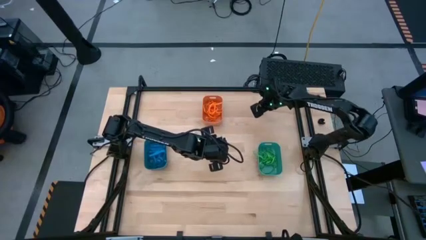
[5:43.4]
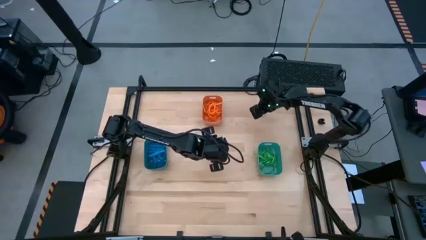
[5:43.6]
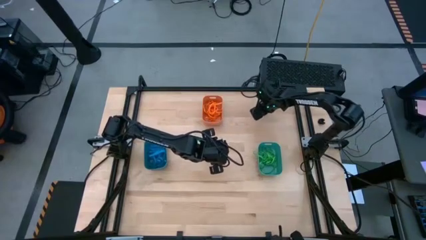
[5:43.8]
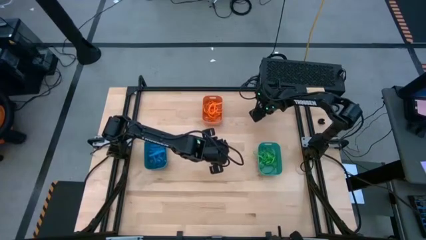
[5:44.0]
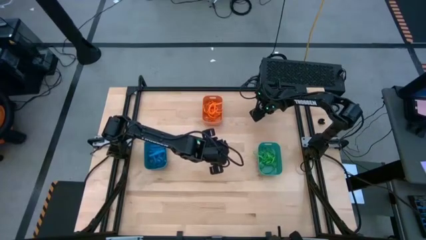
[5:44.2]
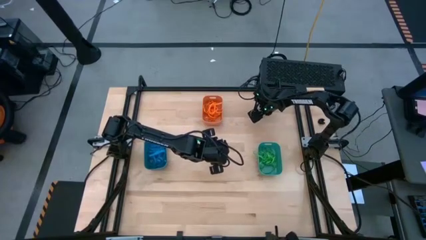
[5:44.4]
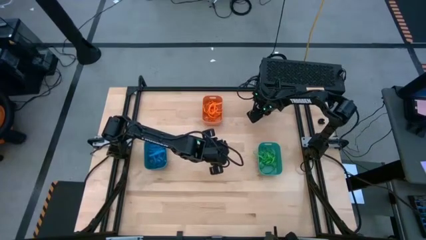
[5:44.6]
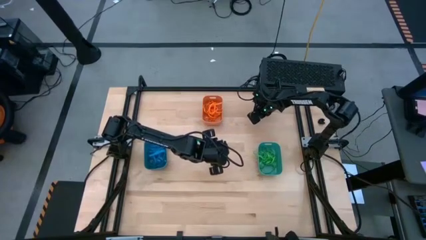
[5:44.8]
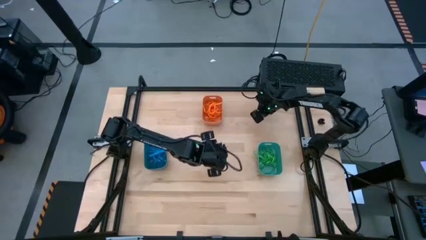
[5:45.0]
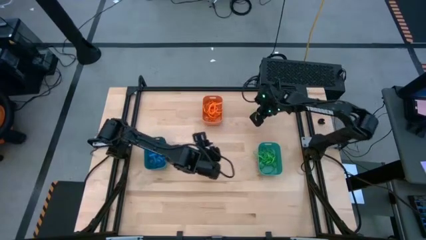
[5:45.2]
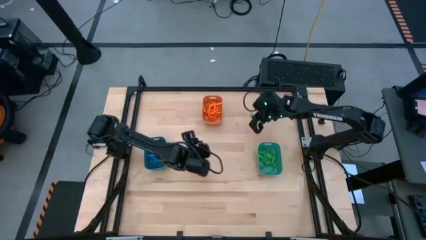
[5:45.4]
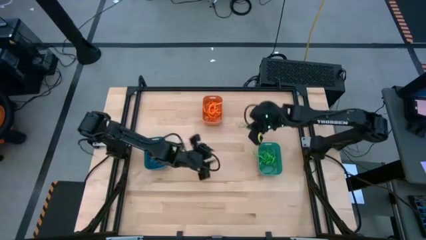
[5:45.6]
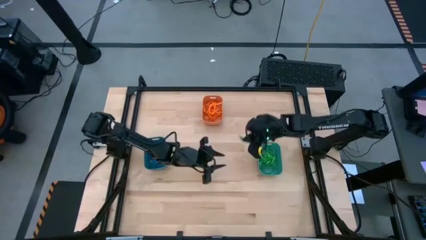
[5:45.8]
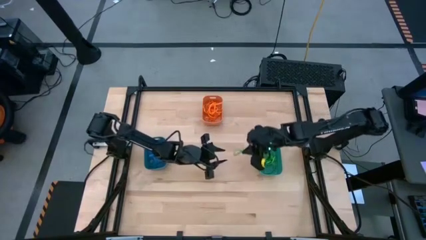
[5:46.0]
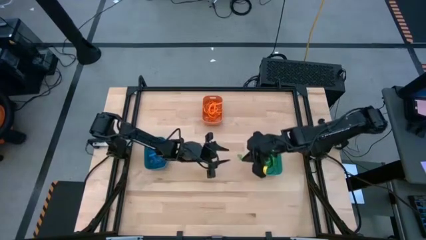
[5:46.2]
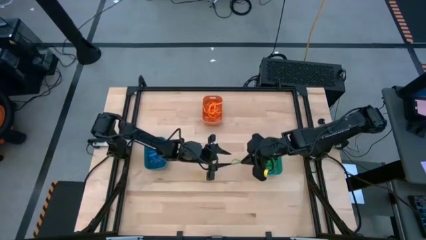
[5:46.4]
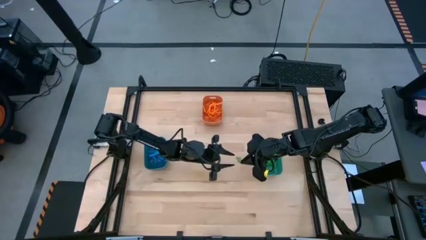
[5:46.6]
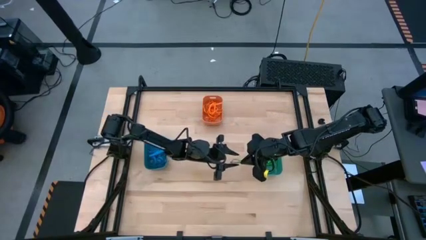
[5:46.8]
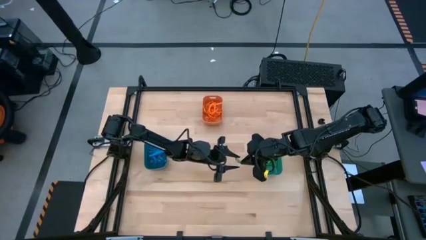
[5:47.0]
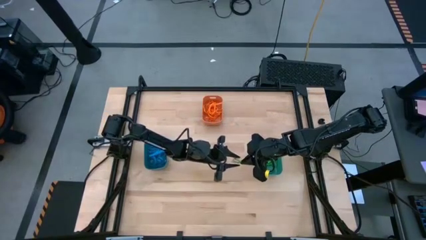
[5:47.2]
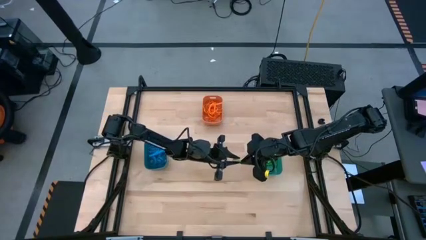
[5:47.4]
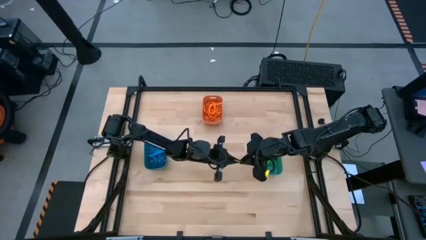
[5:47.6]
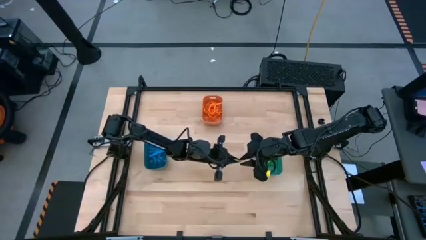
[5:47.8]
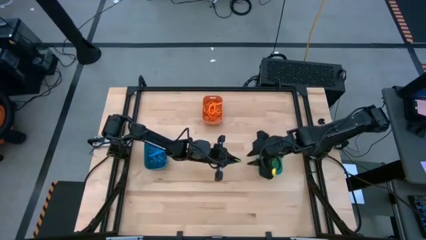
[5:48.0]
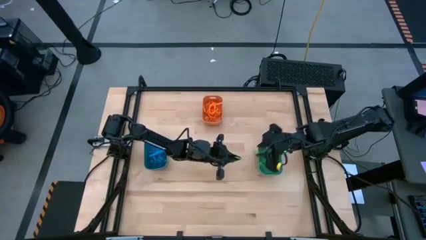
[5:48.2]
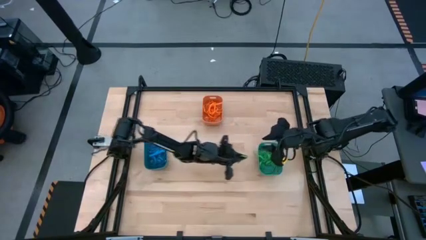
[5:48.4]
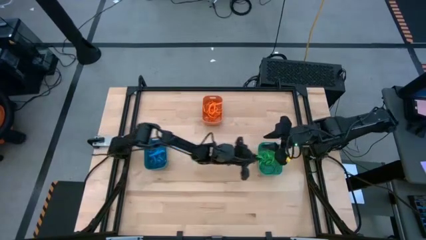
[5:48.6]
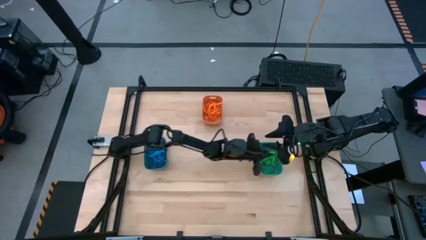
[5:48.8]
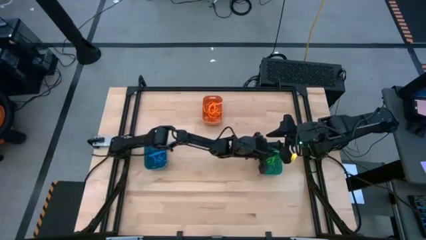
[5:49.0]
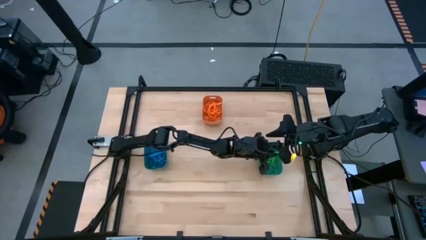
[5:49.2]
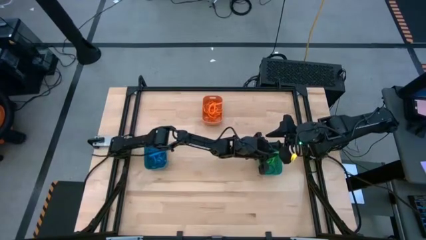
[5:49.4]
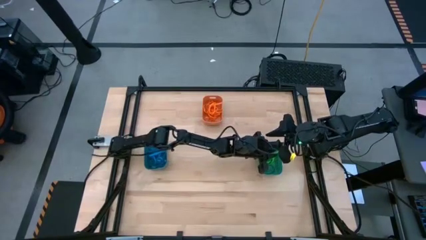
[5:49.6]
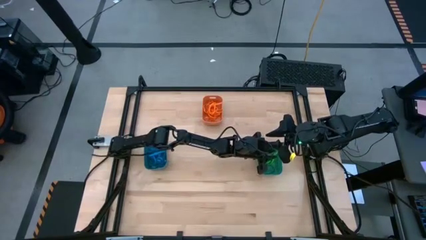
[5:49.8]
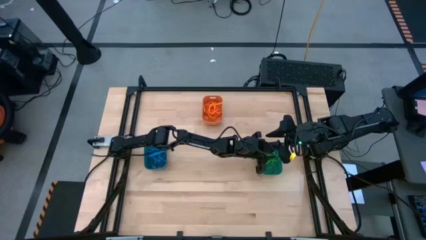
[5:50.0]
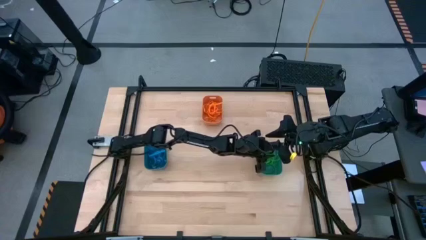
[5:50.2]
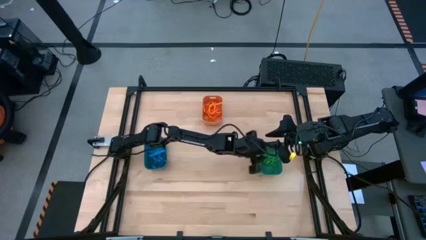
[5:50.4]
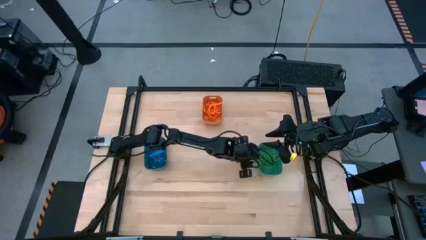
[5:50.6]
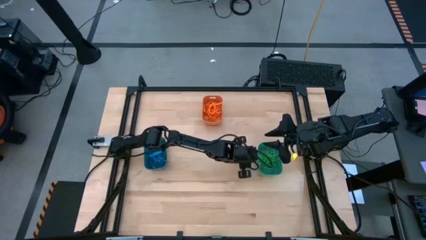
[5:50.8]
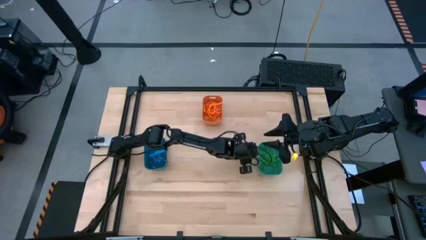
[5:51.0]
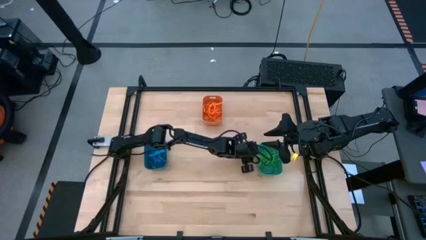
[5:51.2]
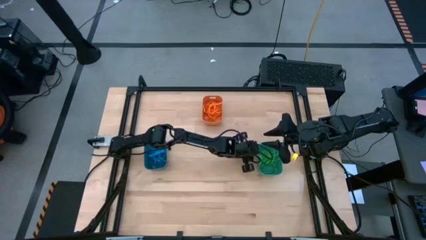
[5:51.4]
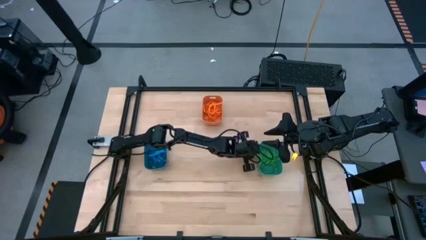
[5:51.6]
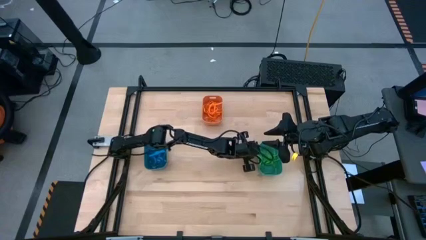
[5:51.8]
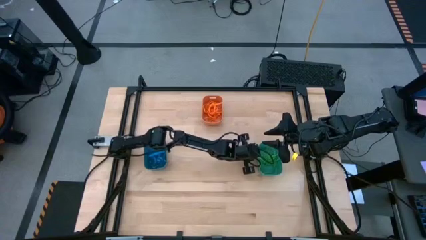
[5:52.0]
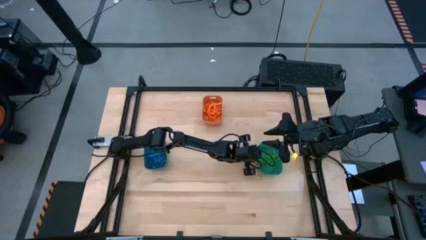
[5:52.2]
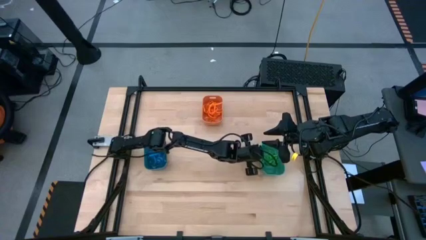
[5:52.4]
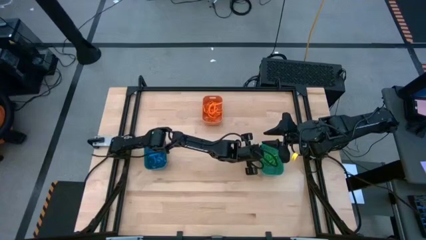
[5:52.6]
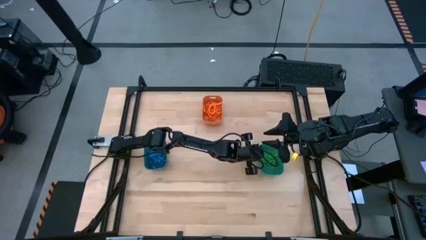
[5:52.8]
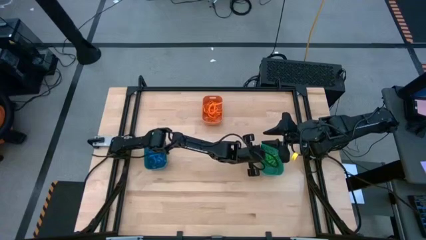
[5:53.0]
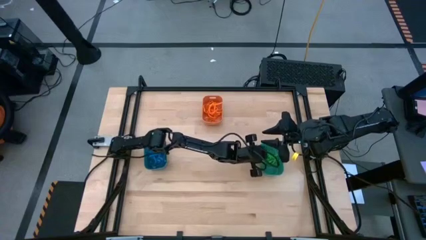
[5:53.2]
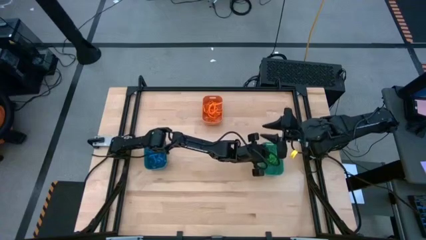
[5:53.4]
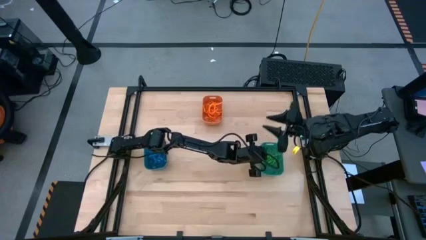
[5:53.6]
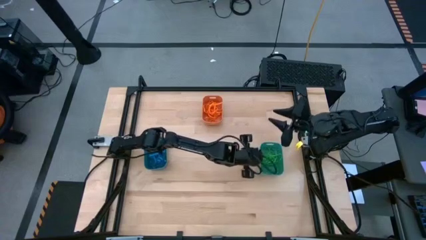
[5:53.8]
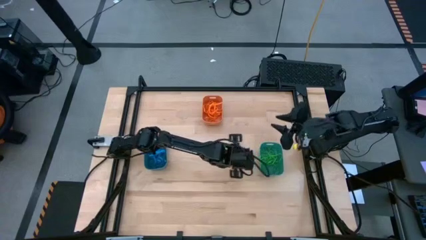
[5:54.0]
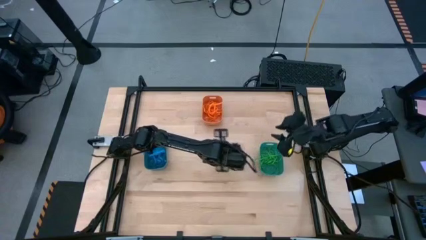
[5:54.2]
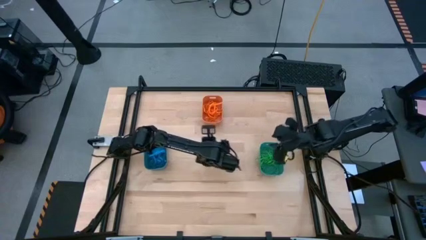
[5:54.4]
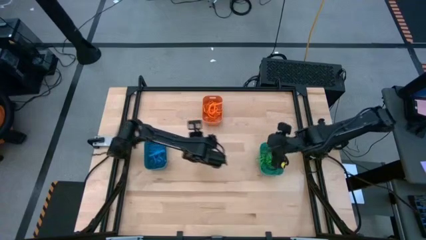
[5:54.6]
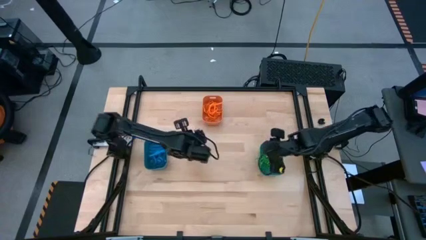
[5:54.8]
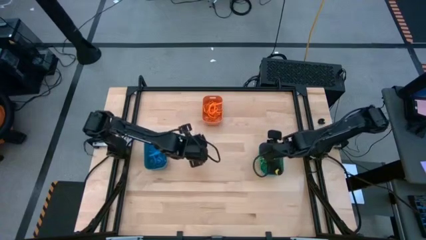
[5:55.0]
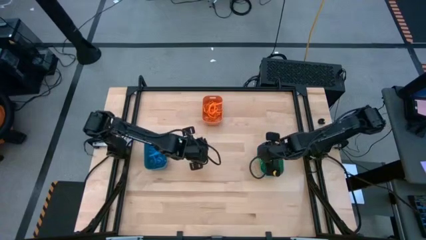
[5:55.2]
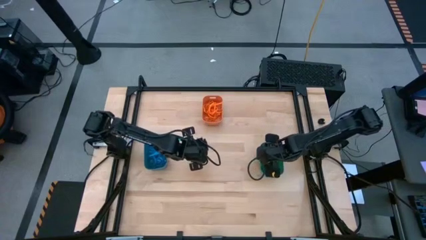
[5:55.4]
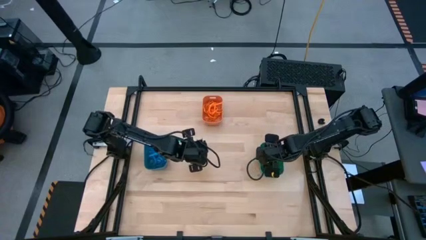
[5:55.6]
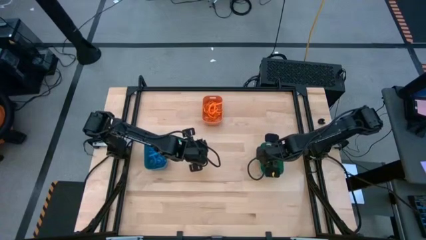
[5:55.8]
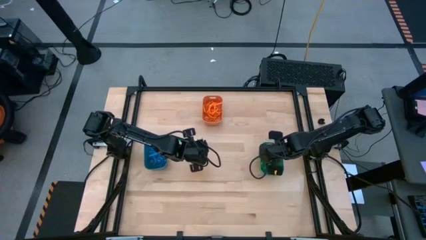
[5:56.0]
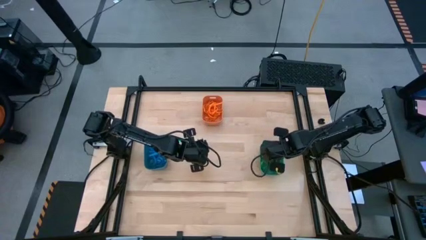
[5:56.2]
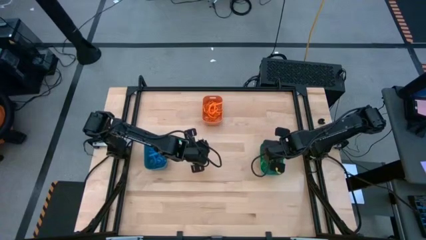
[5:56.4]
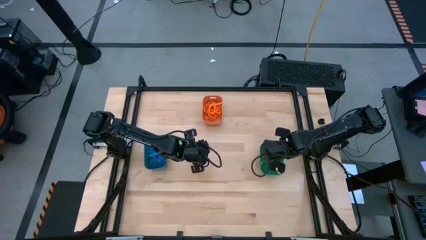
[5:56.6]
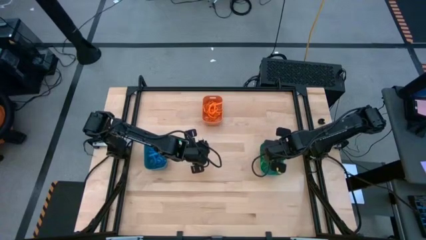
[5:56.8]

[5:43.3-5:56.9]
Task: Sort rubber bands into baskets
Put the green rubber band into the green bin

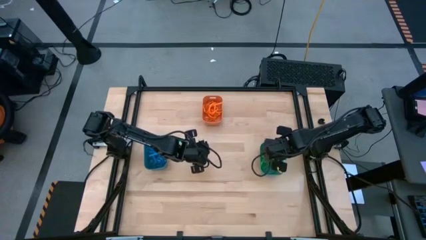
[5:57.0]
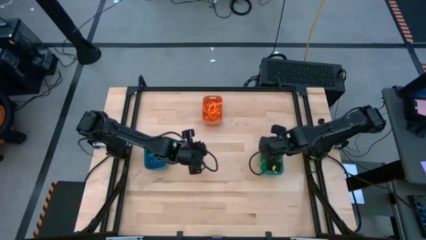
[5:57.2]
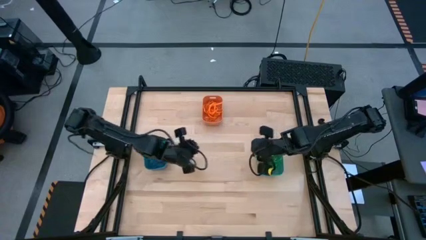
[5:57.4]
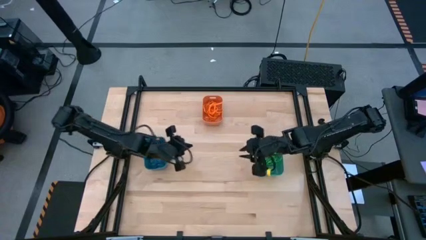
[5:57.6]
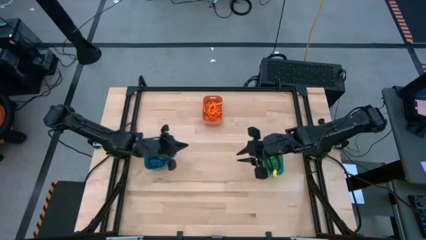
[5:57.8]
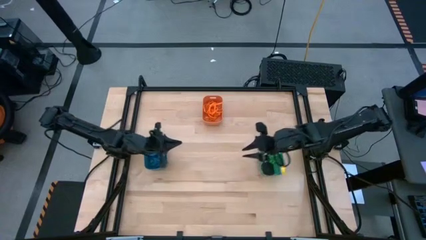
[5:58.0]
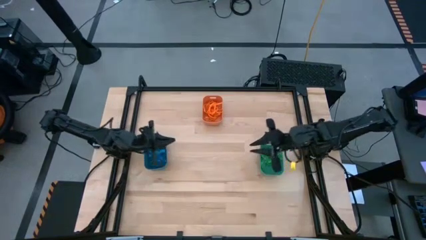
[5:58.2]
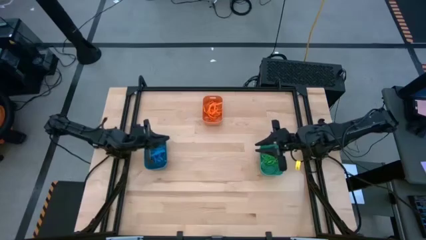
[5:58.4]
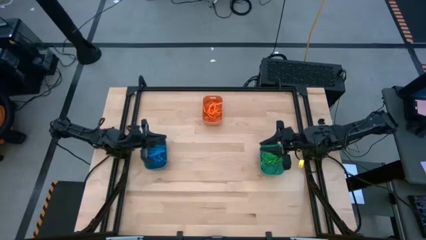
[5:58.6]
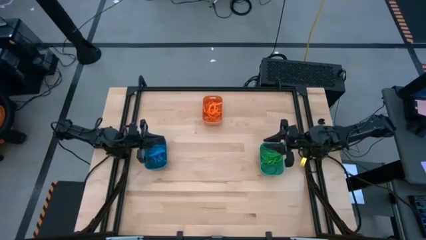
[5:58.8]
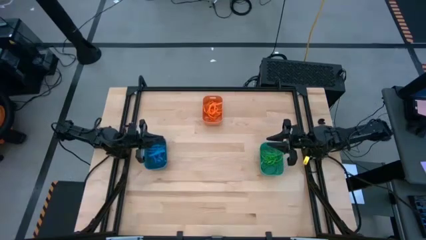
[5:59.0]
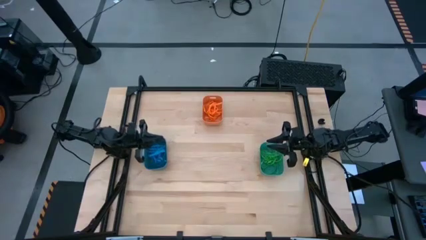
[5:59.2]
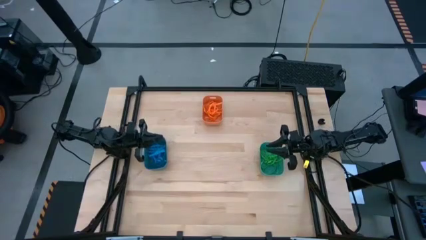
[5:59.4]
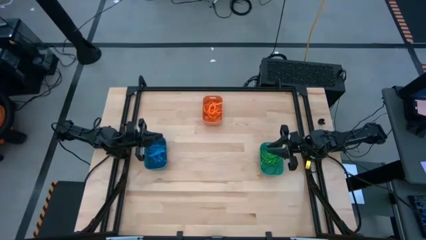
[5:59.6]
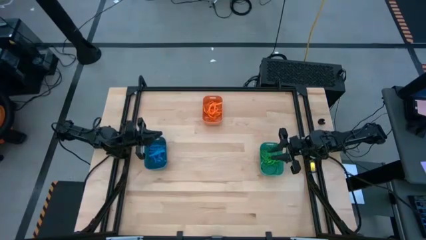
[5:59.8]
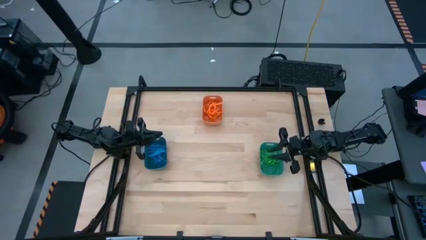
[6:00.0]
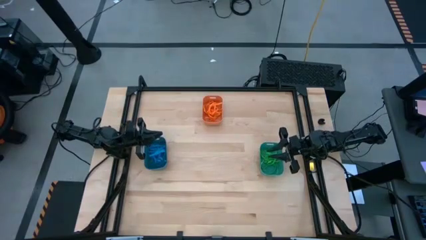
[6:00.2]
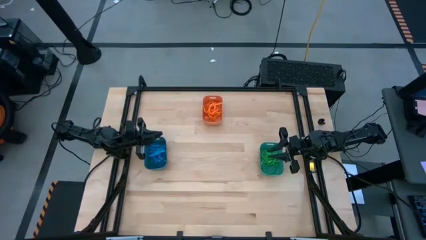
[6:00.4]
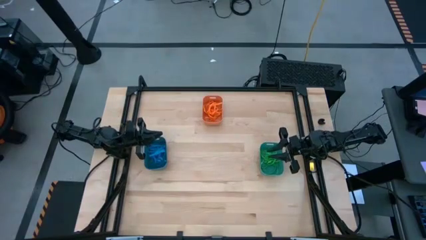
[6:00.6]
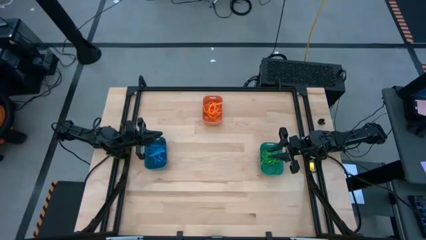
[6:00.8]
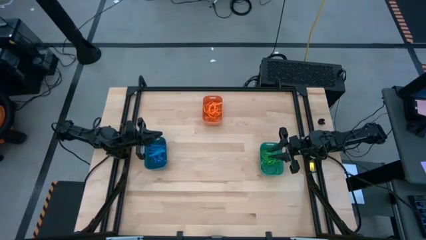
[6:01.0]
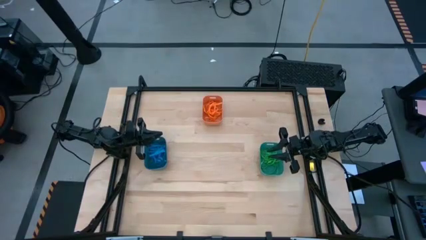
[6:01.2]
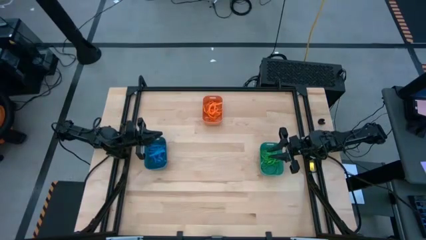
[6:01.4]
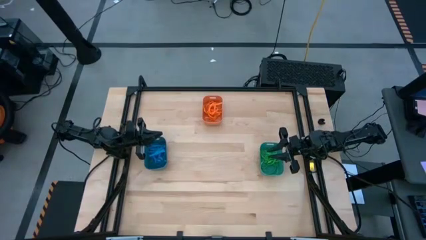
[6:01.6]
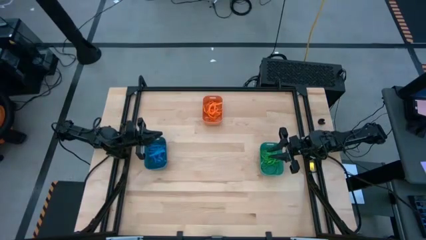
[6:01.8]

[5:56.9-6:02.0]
Return to Home Position
